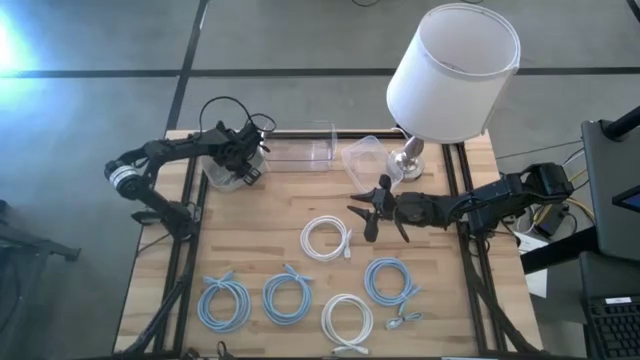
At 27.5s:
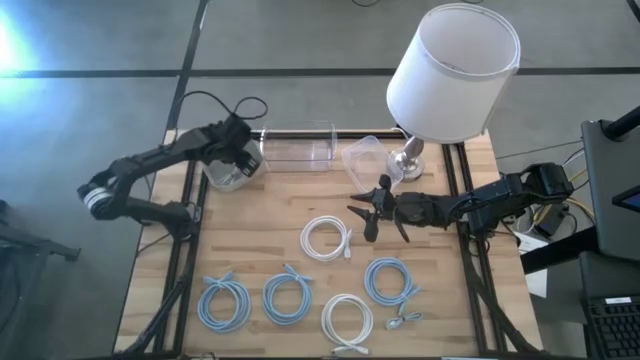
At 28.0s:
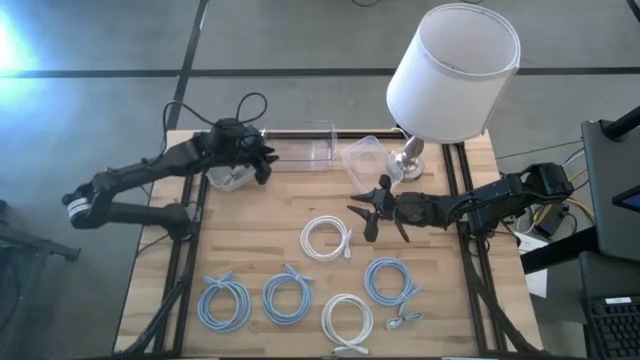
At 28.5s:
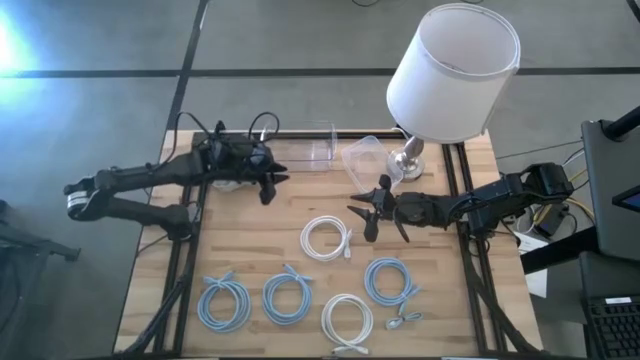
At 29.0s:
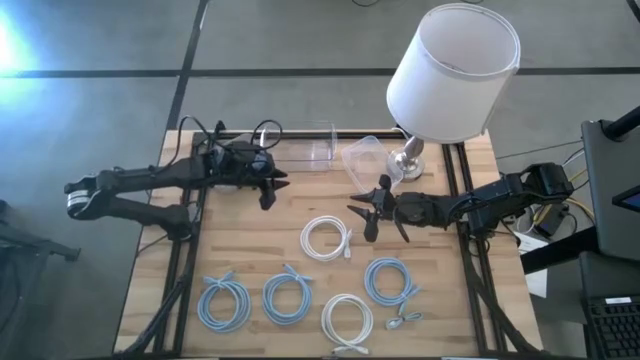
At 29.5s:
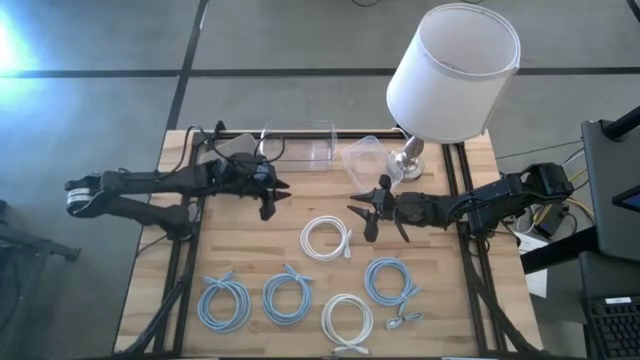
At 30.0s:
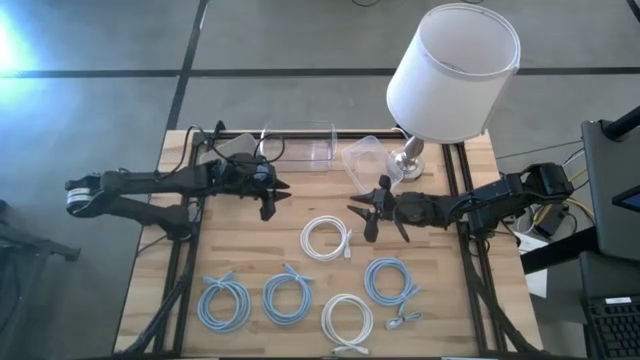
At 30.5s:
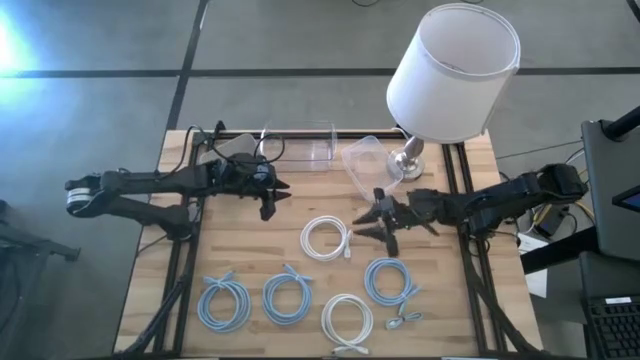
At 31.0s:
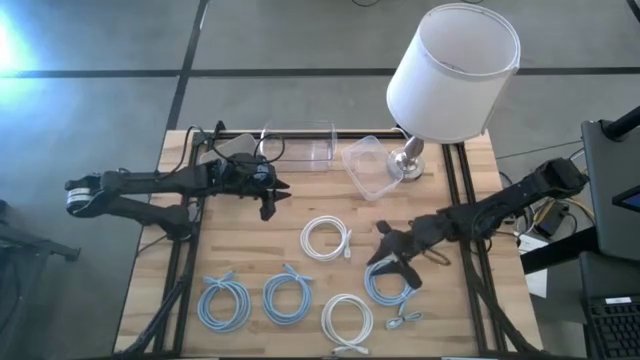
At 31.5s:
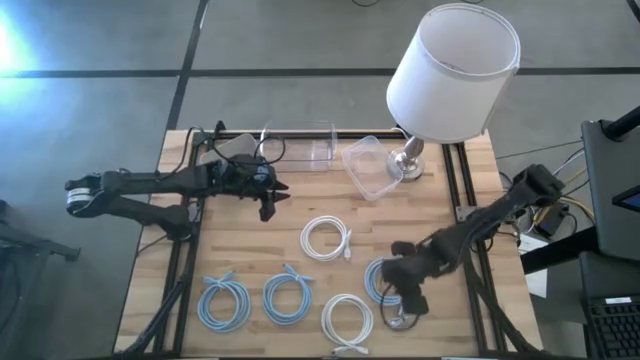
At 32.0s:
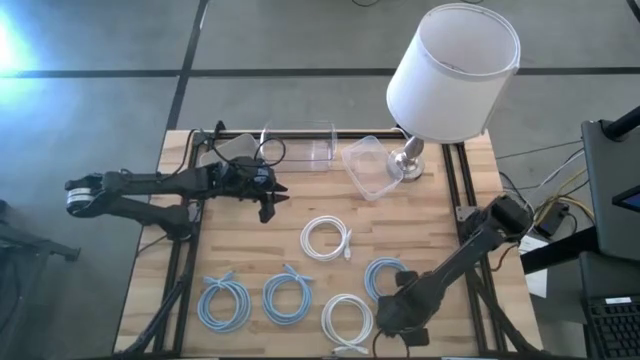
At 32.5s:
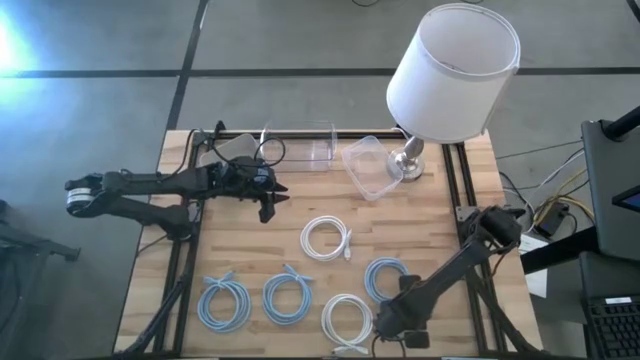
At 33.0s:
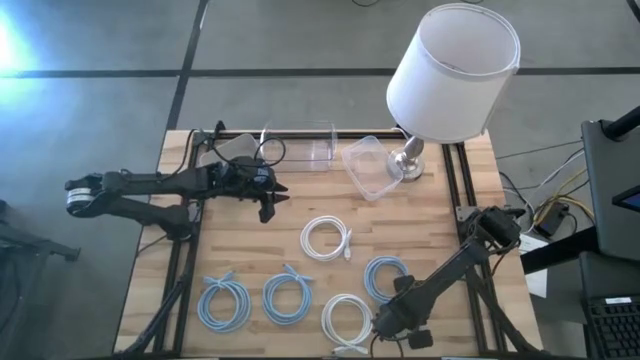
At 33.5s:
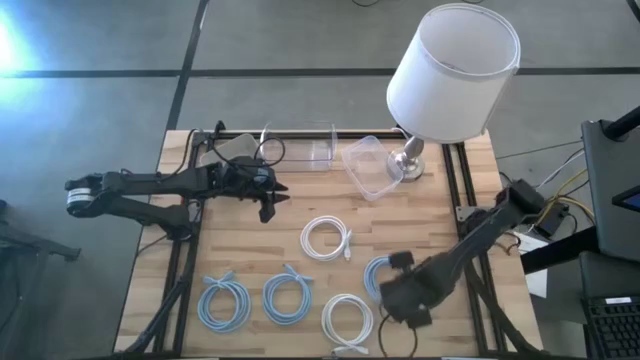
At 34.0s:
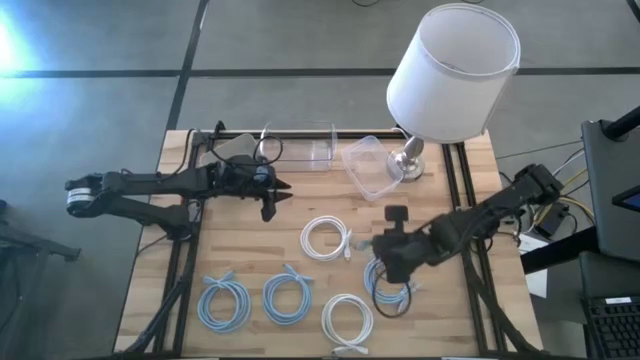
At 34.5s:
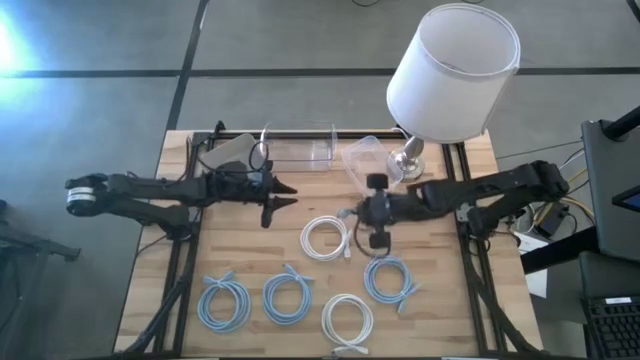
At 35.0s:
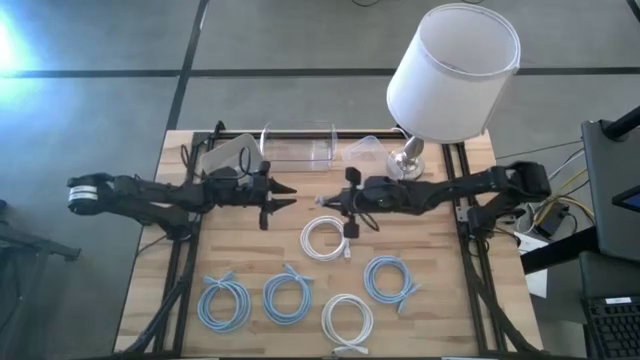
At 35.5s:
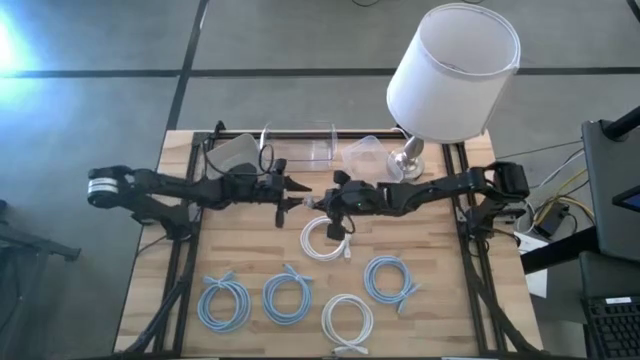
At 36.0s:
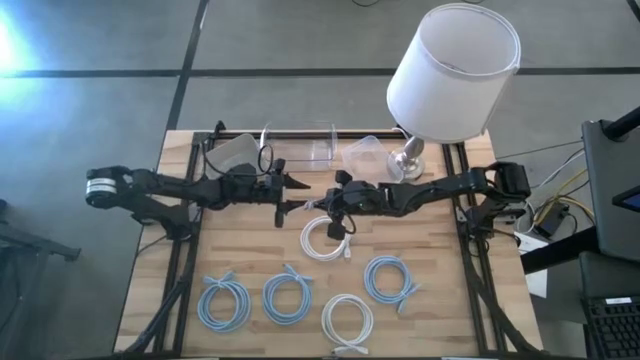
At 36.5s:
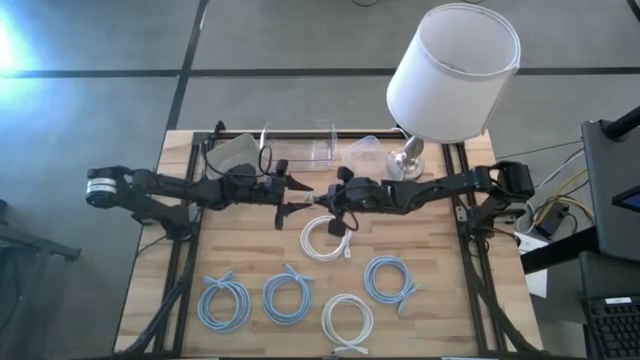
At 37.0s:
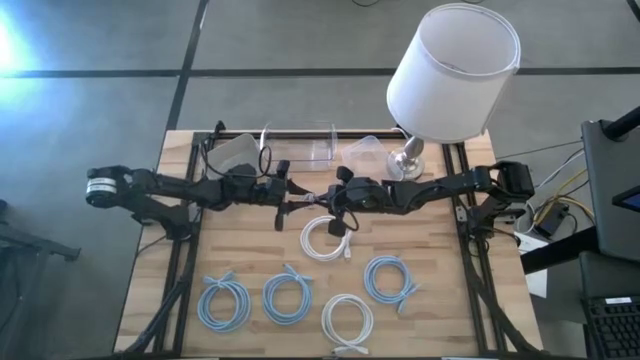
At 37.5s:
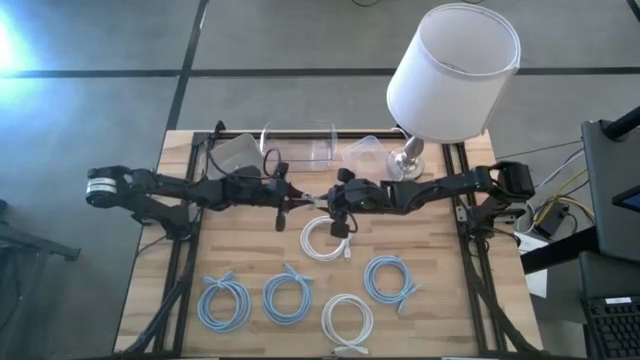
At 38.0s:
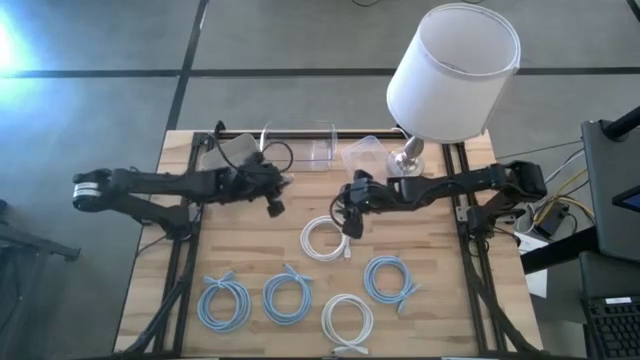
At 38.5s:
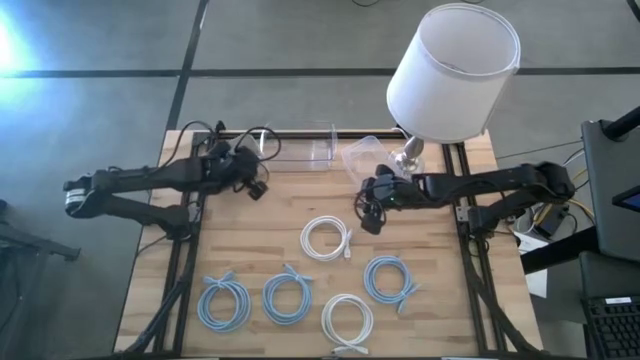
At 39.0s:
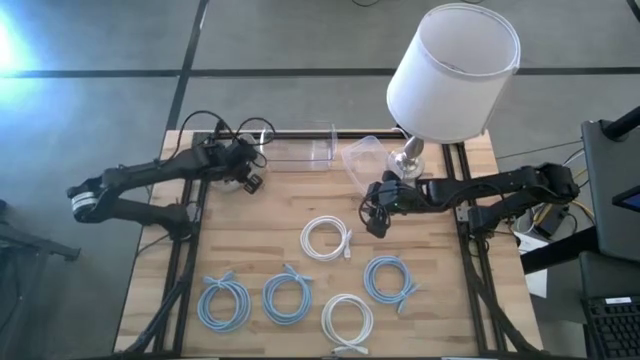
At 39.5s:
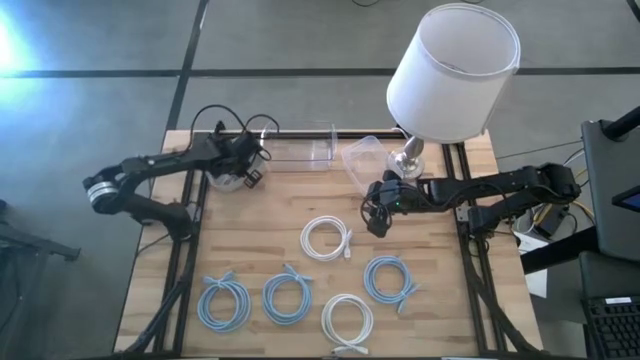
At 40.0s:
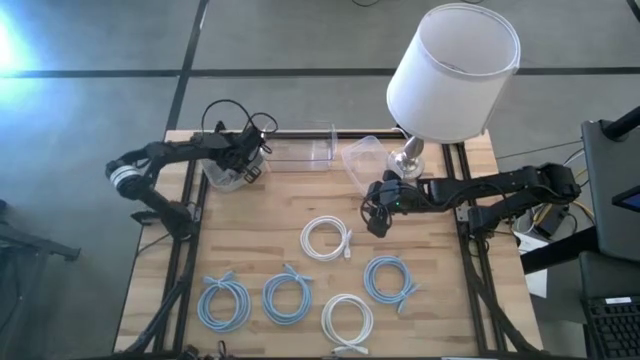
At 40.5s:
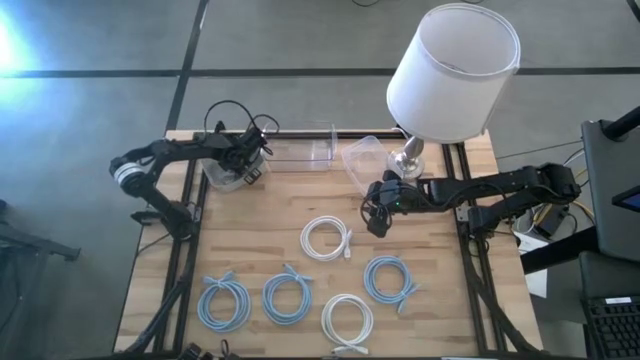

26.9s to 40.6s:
Task: Pick & Place USB Port
Put the light blue charger cable into the gray bin

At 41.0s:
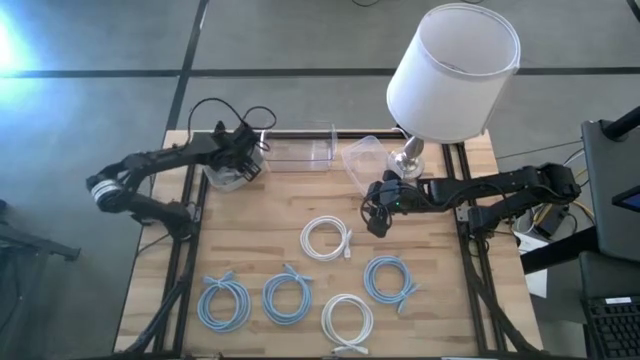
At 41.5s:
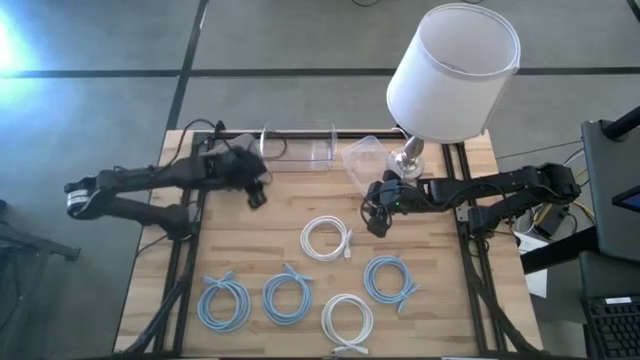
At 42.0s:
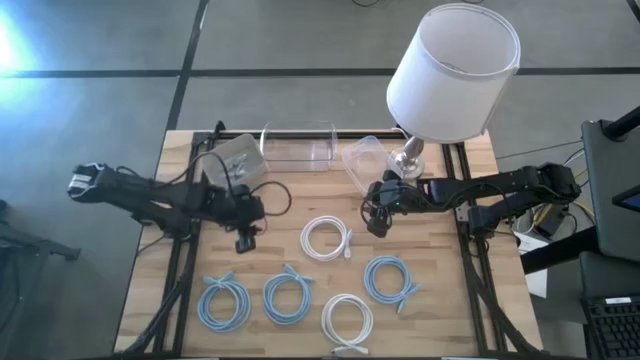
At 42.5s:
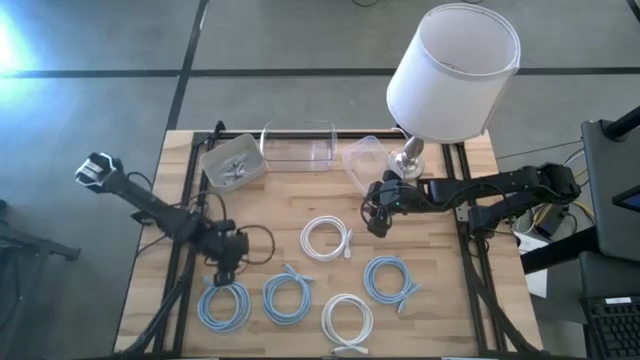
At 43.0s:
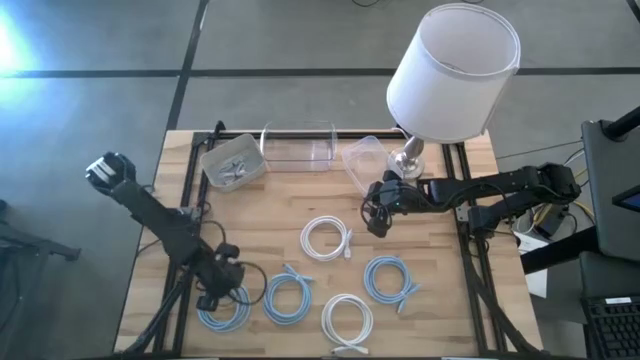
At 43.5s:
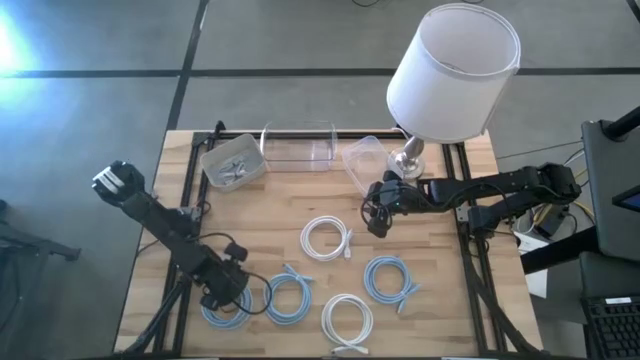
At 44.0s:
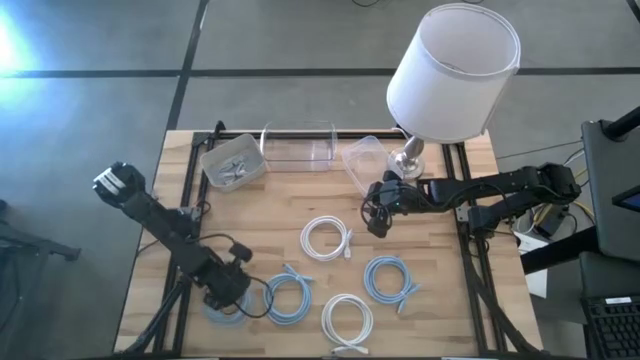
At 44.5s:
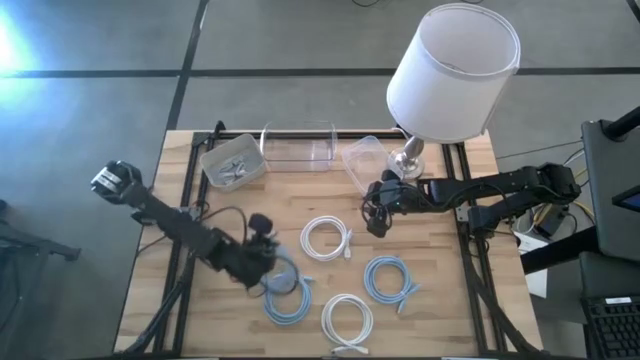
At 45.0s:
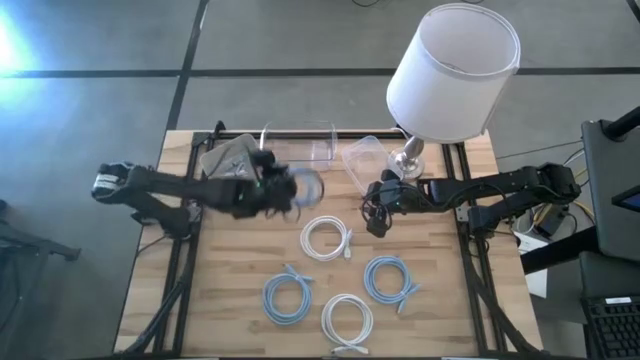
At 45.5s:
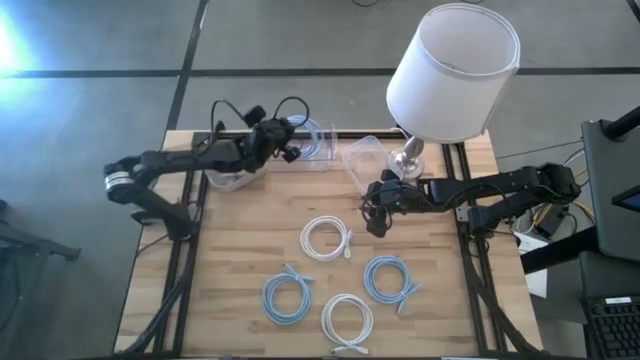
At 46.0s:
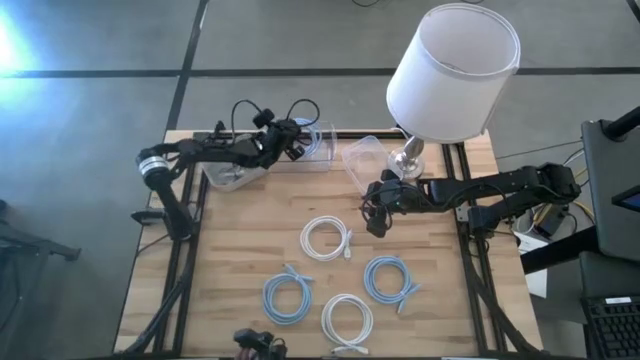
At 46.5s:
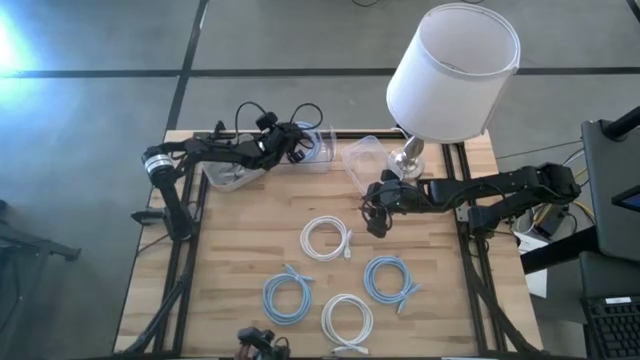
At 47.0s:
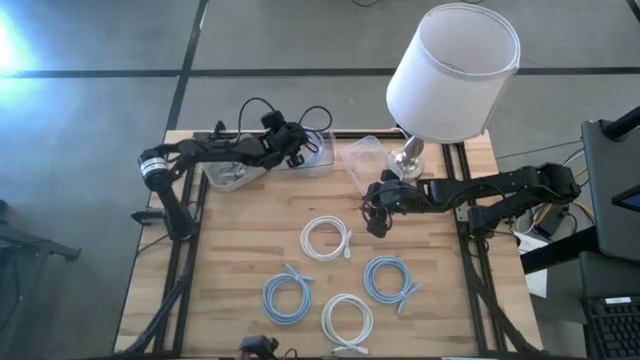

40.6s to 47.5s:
Put the left light blue HDMI cable into the transparent bin
